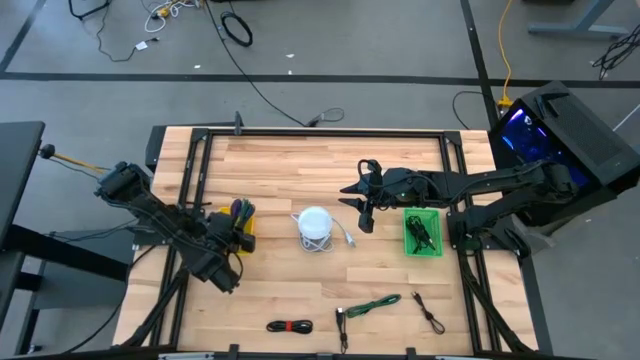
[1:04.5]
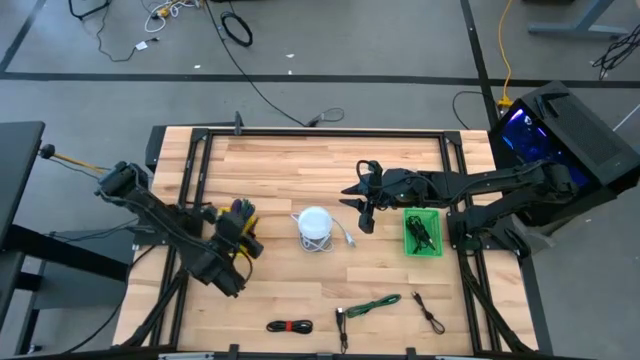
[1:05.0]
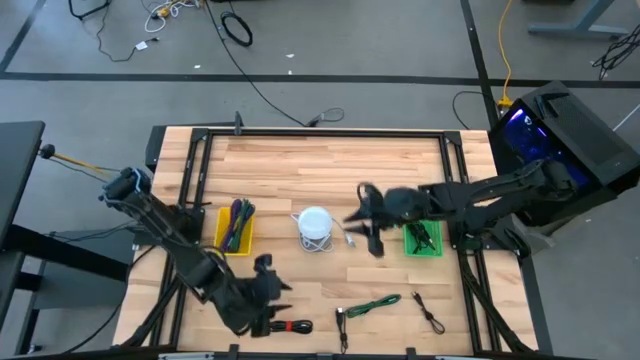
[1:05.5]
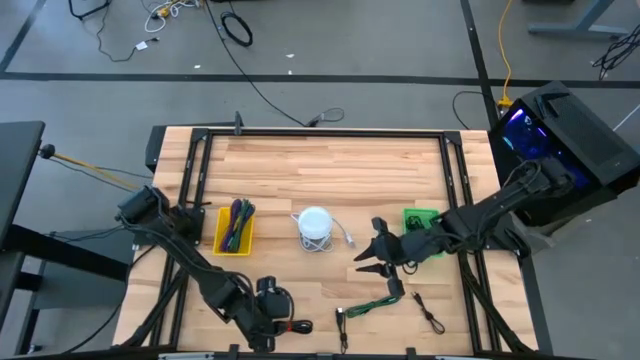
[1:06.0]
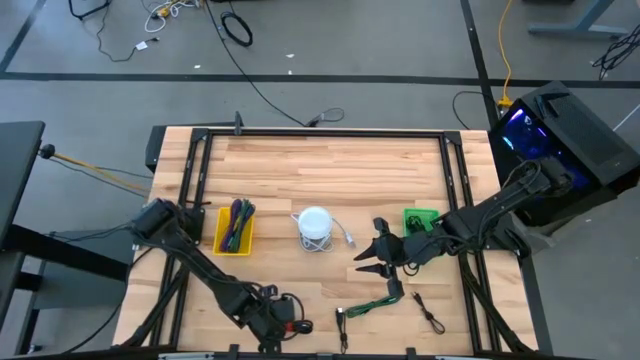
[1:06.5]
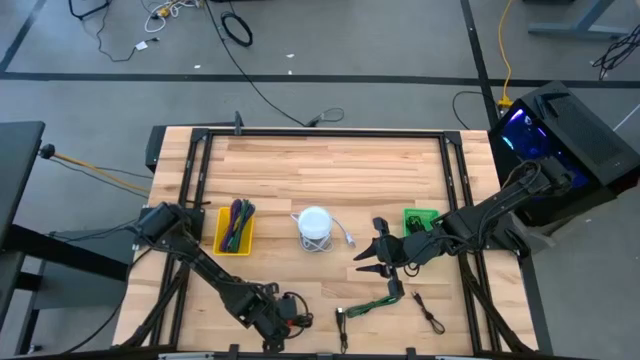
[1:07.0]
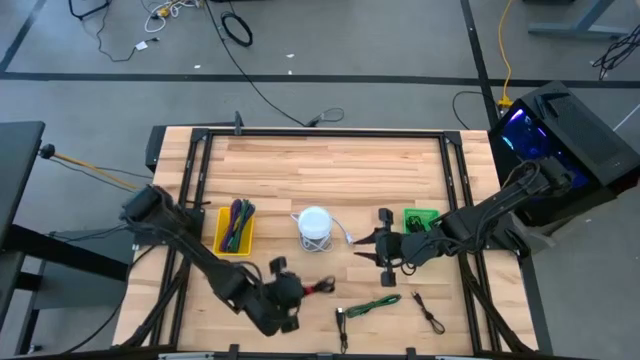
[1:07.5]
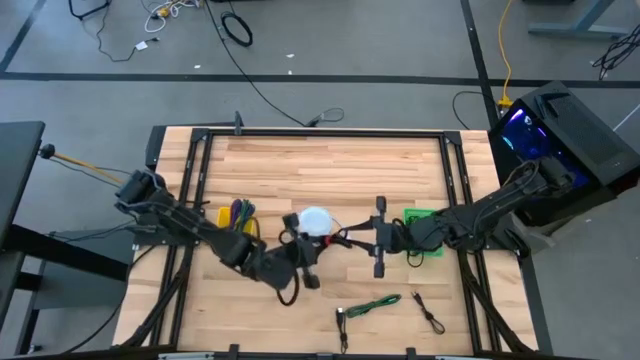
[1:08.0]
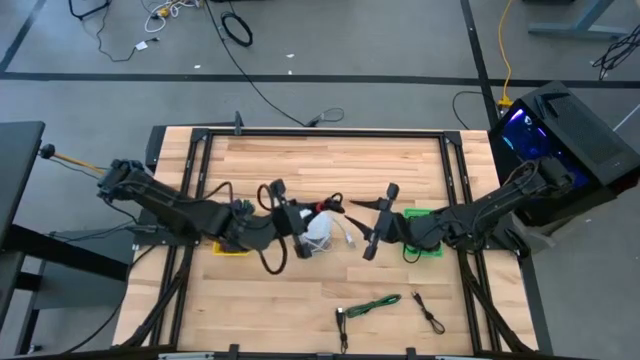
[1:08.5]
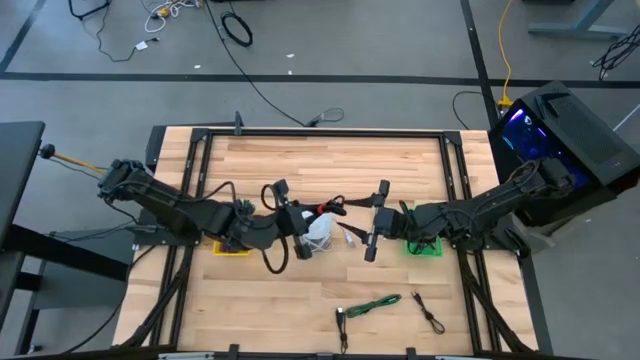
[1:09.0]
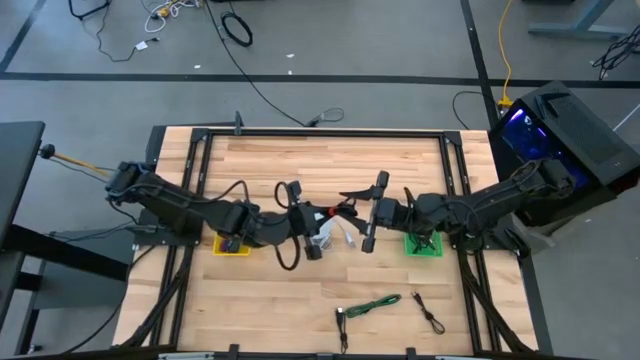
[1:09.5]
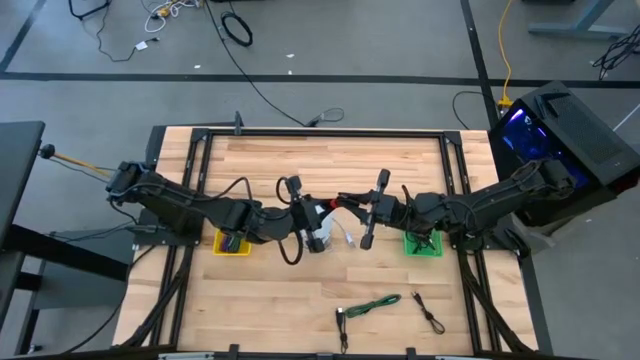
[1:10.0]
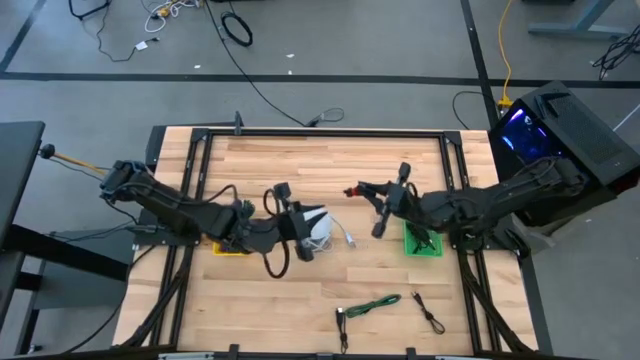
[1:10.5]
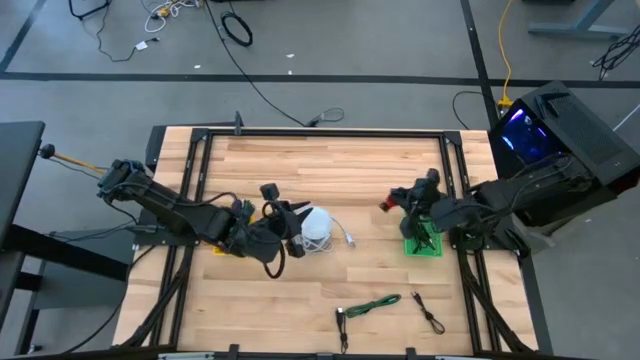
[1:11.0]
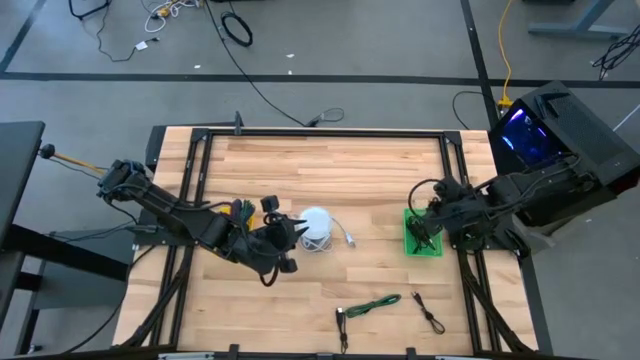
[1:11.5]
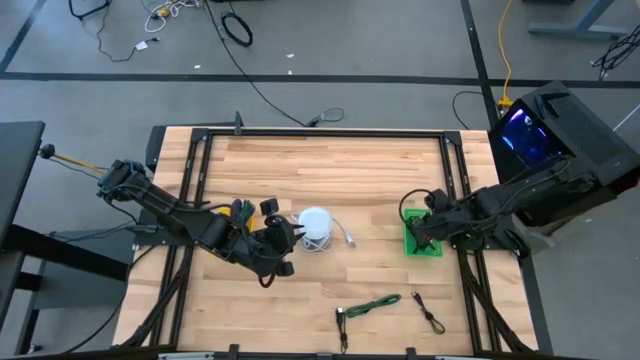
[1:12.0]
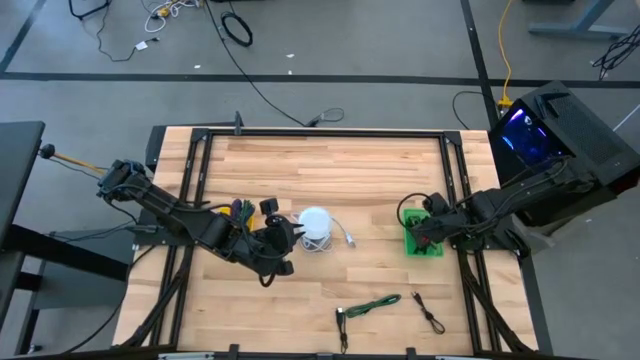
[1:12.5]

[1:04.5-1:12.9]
Task: Pick & Place USB Port
Put the black charger cable into the green bin

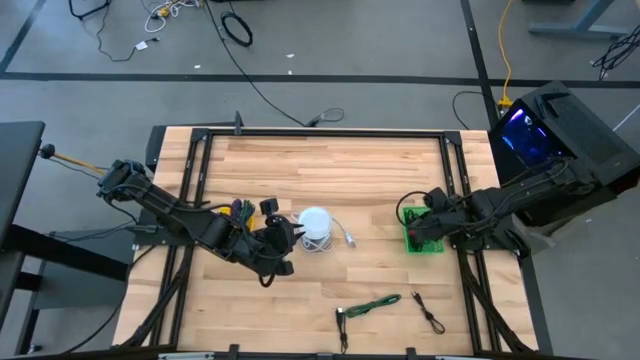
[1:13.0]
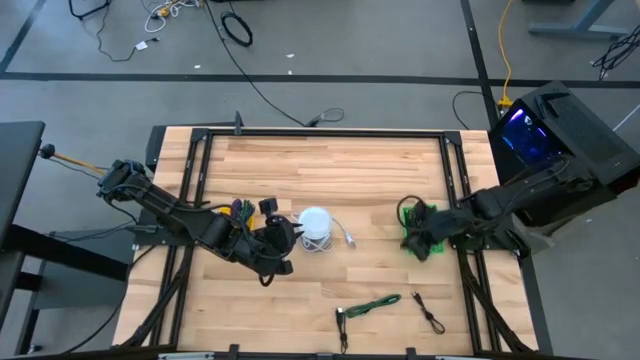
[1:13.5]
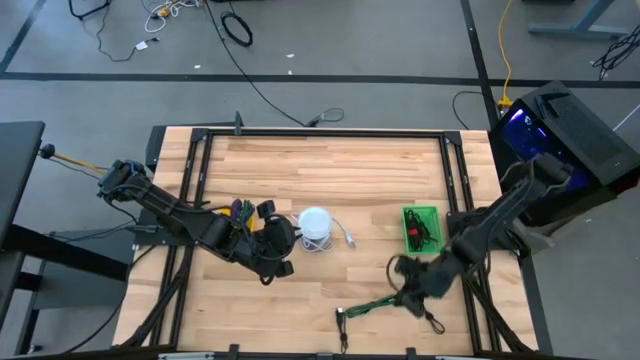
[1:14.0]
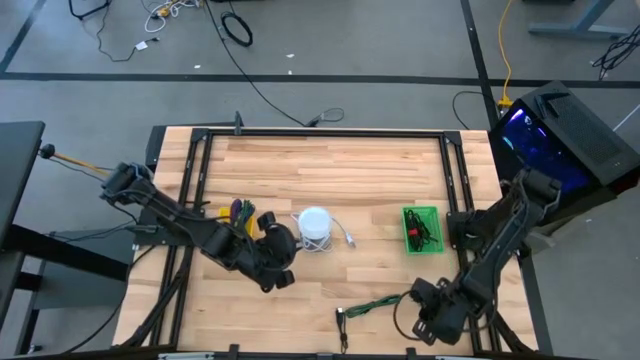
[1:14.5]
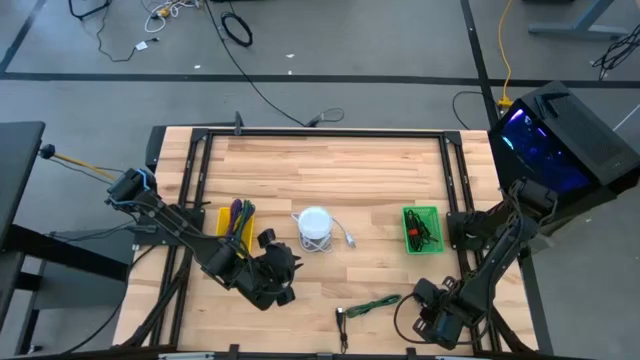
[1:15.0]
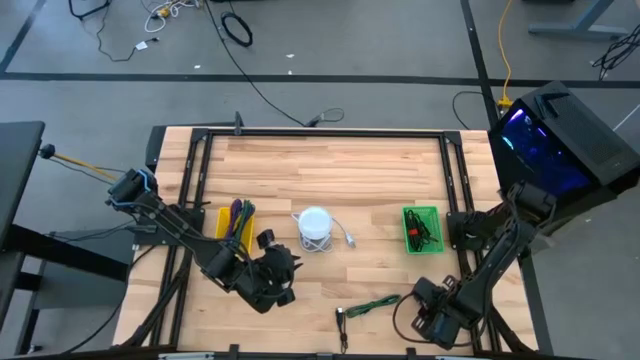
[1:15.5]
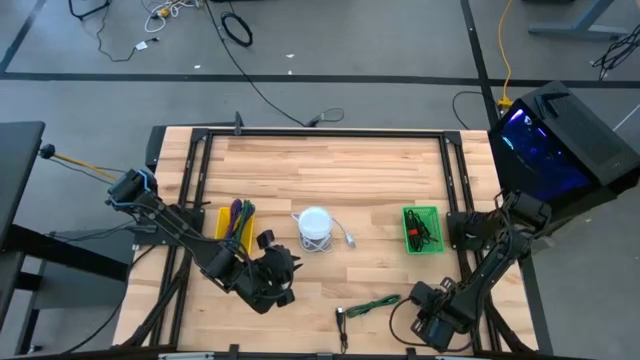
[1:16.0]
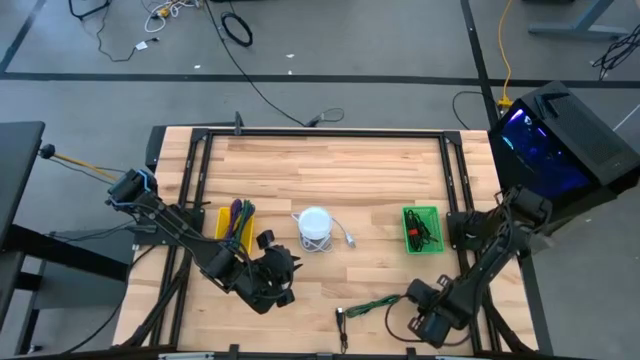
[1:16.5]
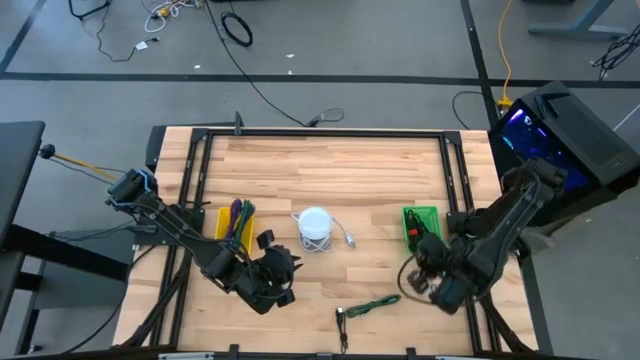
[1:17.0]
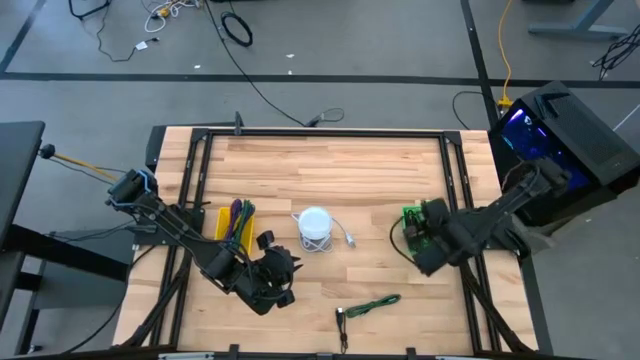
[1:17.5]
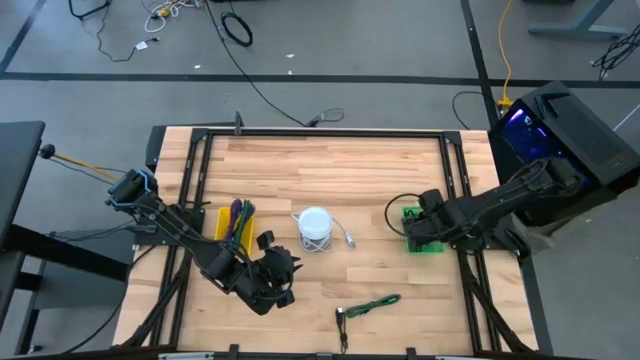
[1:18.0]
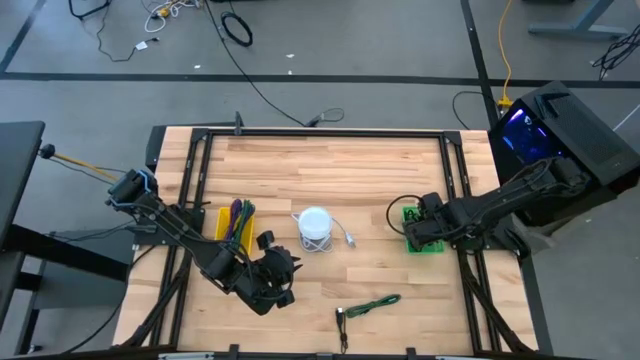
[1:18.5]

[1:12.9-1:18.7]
Put the black charger cable into the green bin

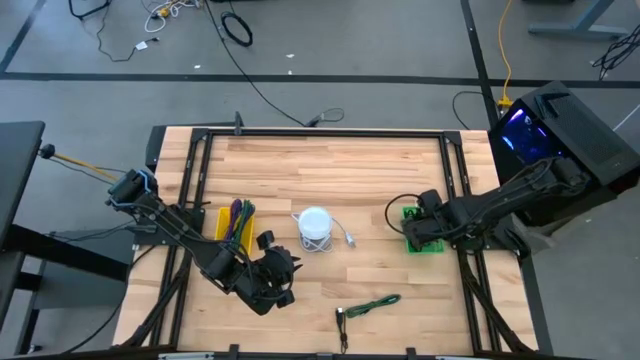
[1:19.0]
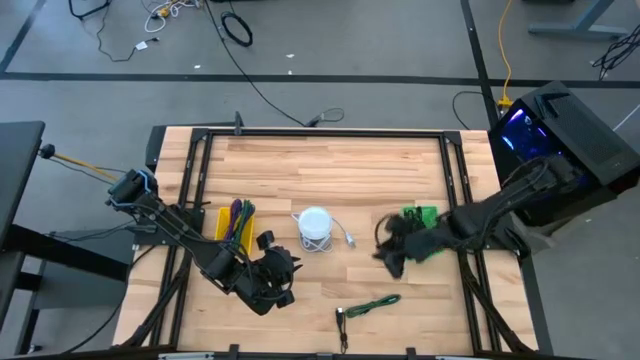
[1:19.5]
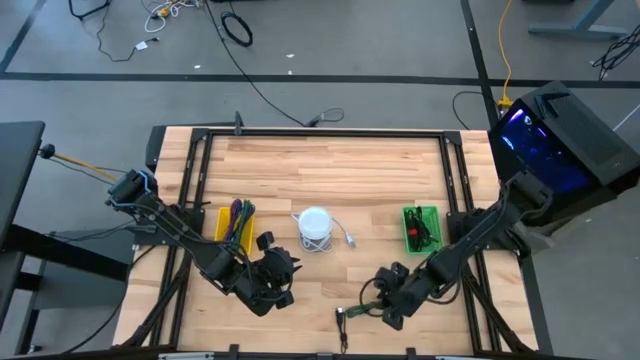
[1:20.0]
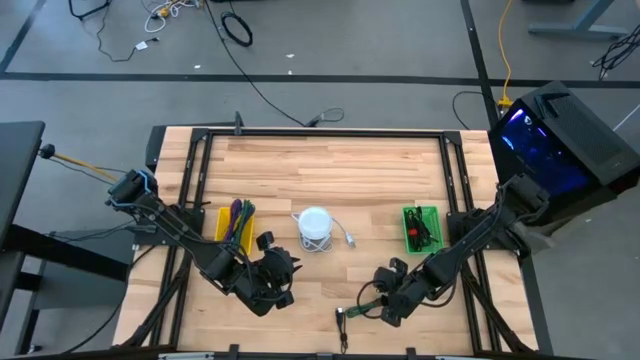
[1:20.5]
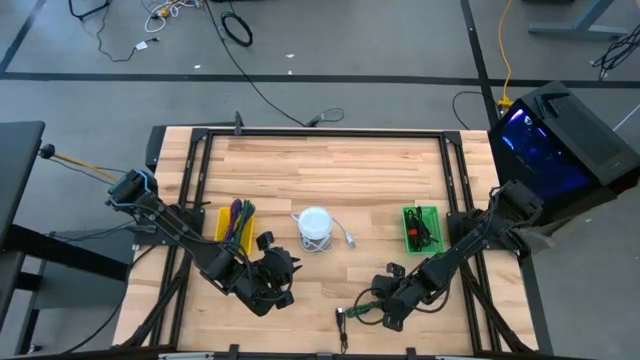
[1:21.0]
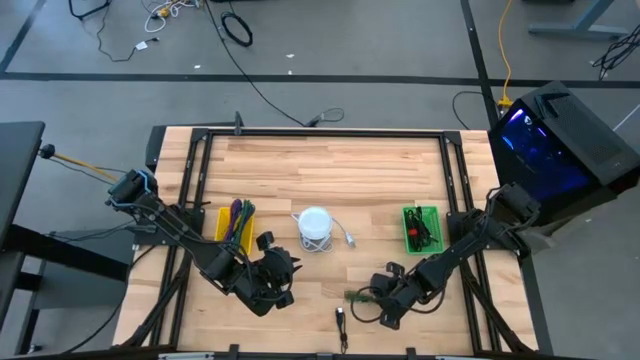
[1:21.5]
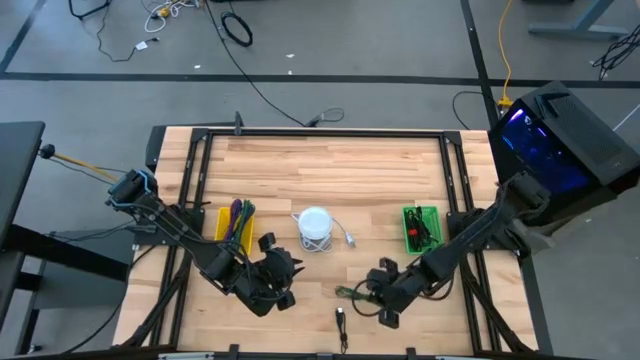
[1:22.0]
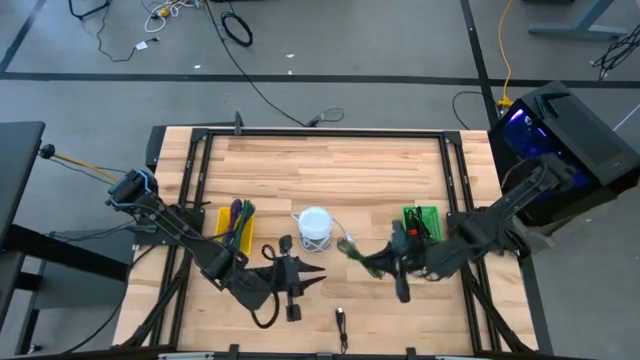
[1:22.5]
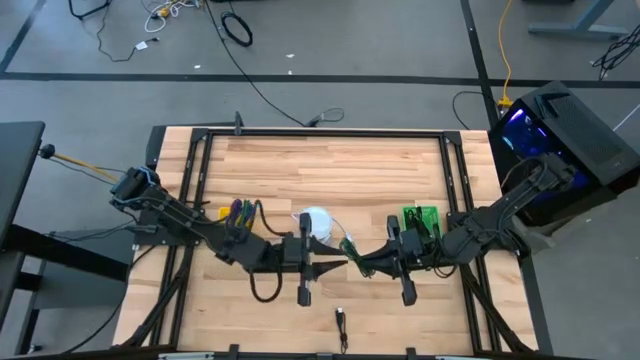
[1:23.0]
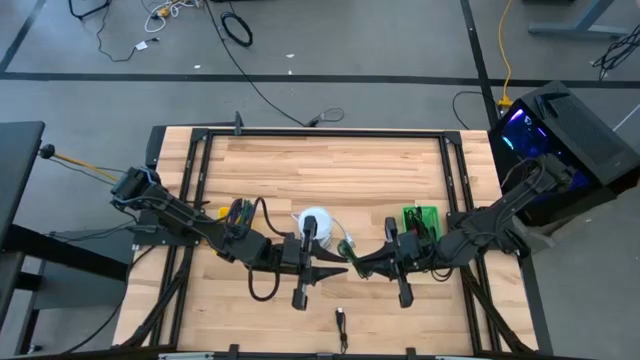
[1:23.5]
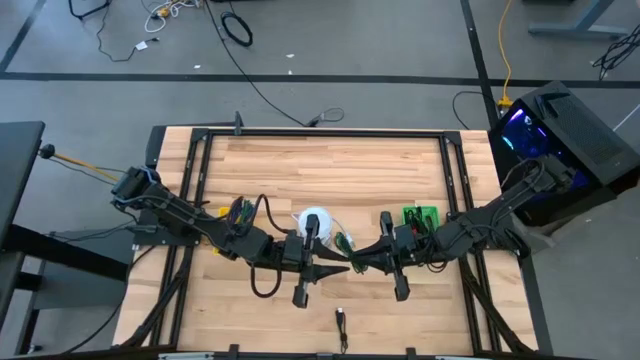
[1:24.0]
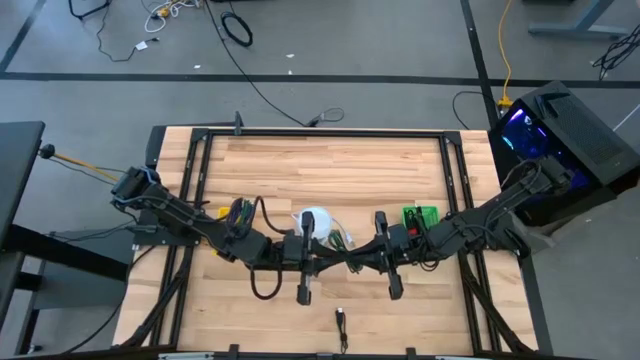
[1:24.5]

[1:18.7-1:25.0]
Put the green charger cable into the yellow bin

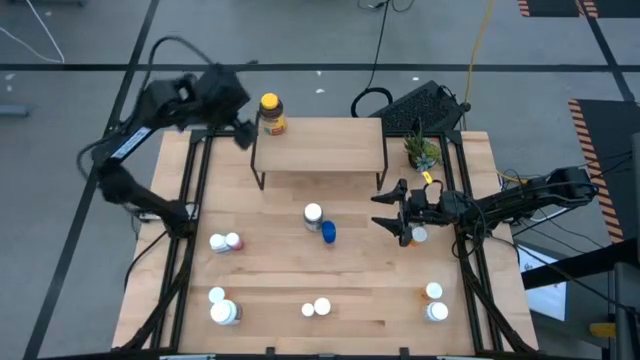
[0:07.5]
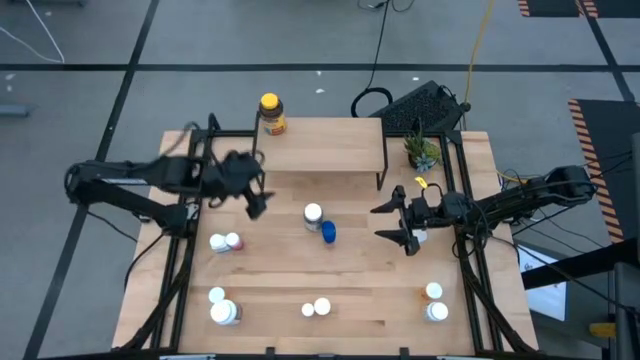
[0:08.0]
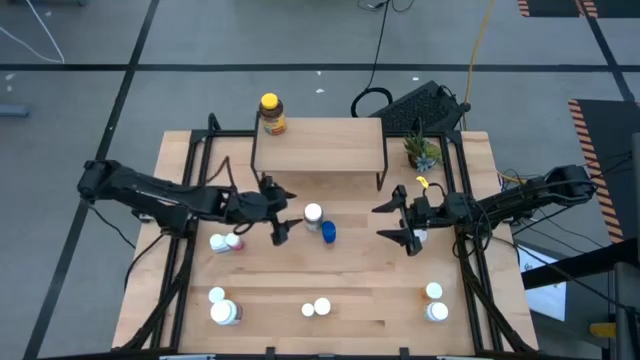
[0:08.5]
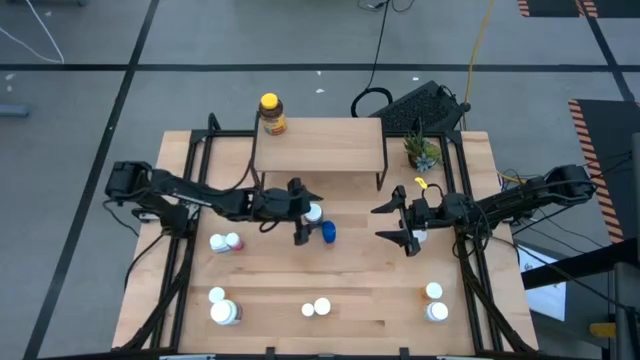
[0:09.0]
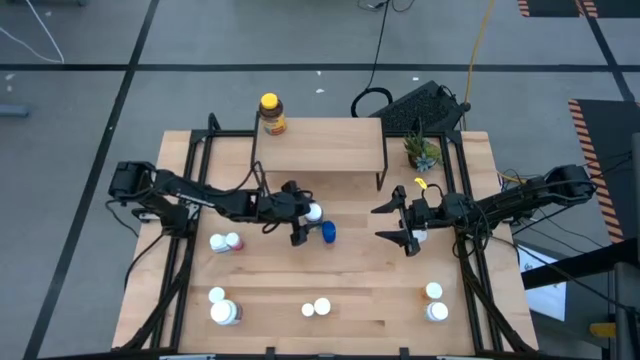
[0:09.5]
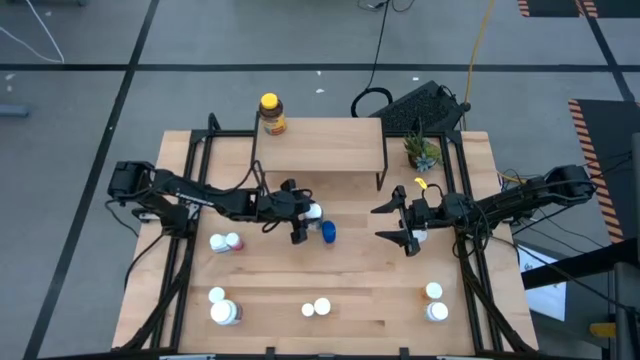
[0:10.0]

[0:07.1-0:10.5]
Task: Pick and place medicine bottles onto shelf by color
Put the large green medicine bottle on the shelf, aligned with the large yellow medicine bottle
